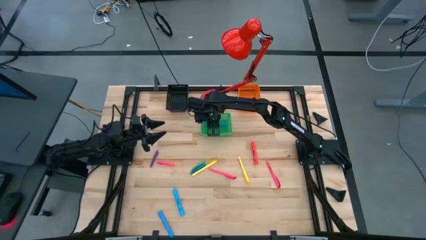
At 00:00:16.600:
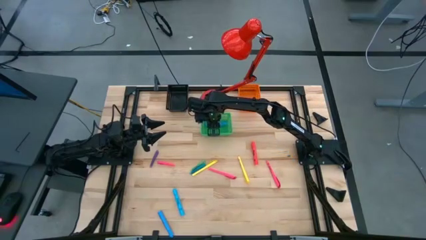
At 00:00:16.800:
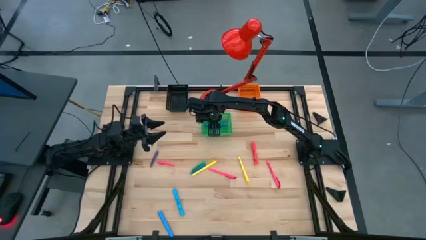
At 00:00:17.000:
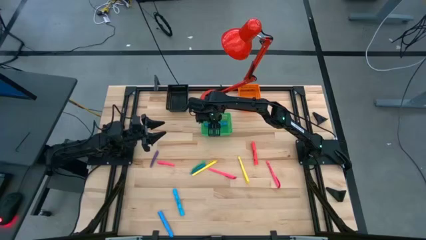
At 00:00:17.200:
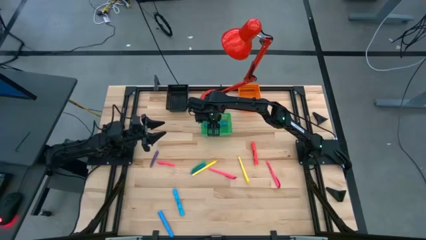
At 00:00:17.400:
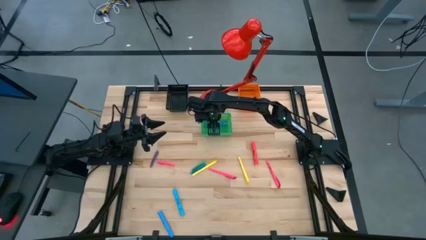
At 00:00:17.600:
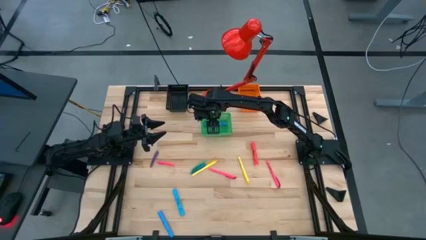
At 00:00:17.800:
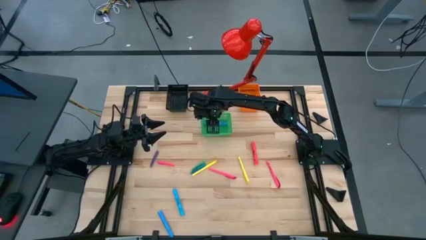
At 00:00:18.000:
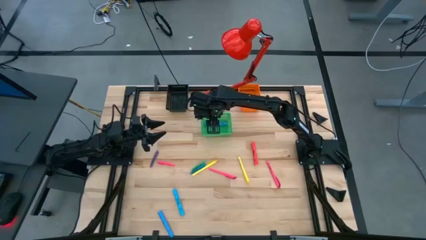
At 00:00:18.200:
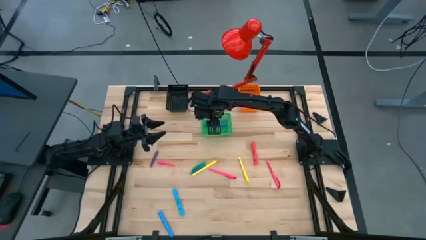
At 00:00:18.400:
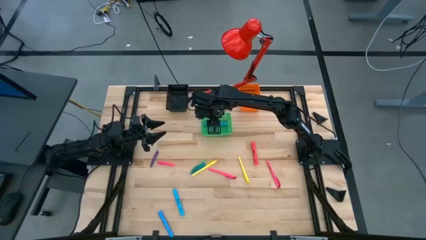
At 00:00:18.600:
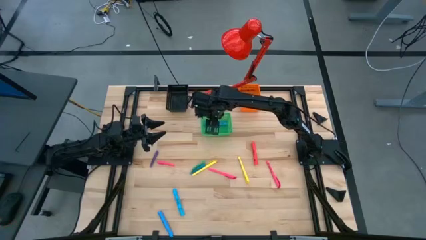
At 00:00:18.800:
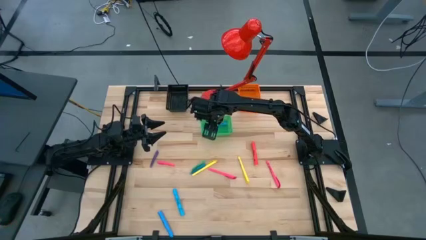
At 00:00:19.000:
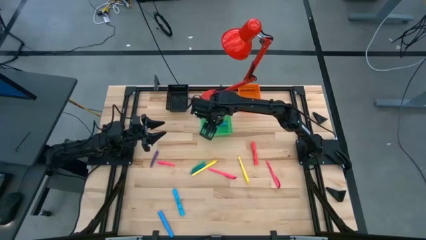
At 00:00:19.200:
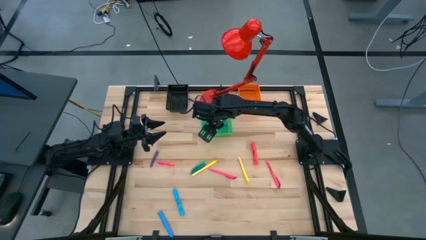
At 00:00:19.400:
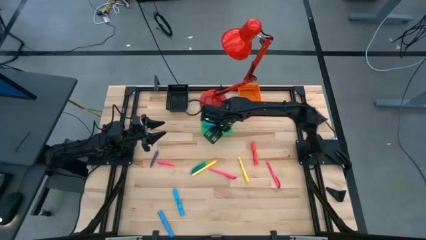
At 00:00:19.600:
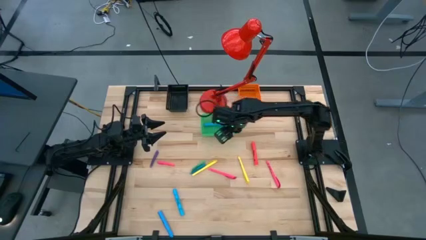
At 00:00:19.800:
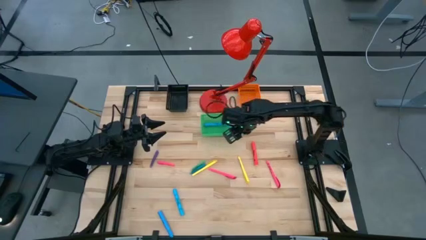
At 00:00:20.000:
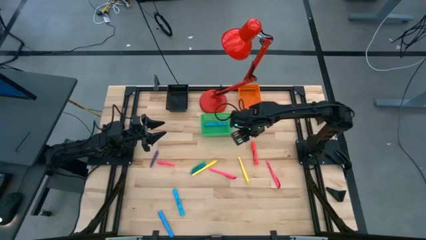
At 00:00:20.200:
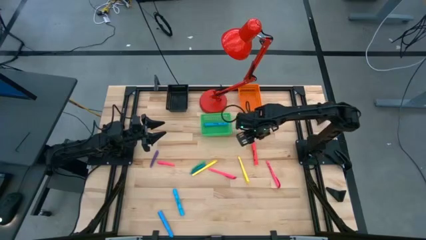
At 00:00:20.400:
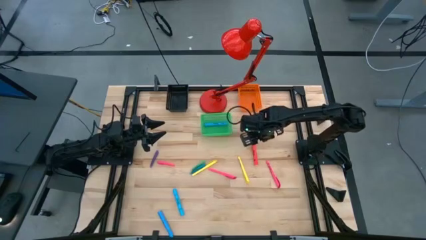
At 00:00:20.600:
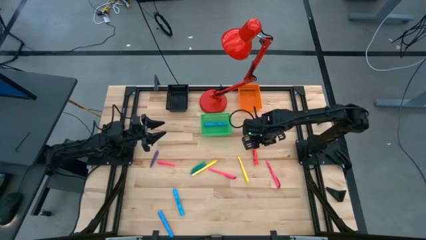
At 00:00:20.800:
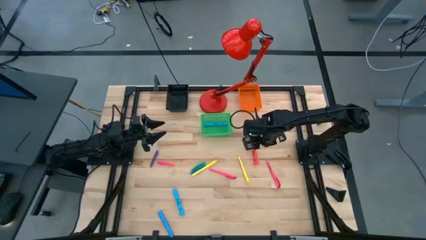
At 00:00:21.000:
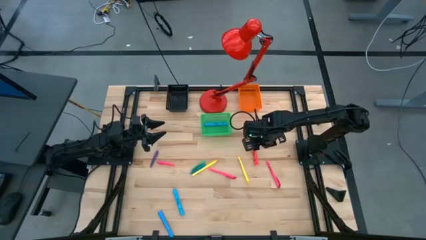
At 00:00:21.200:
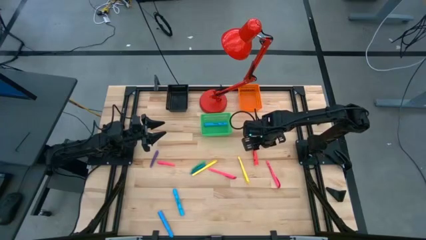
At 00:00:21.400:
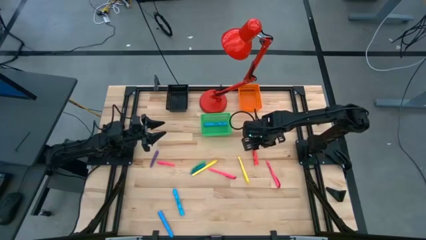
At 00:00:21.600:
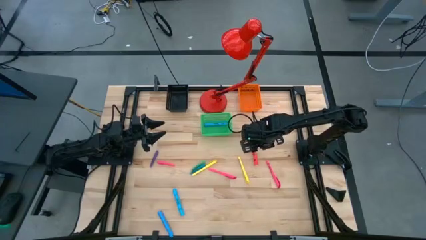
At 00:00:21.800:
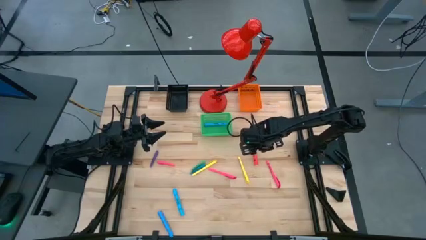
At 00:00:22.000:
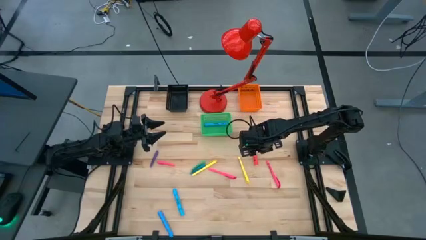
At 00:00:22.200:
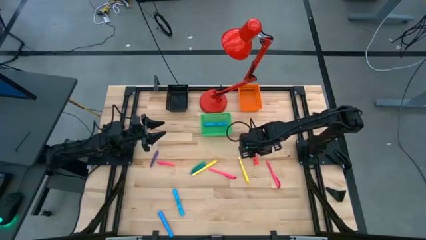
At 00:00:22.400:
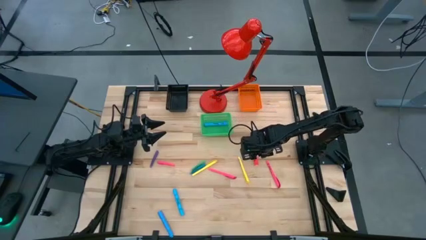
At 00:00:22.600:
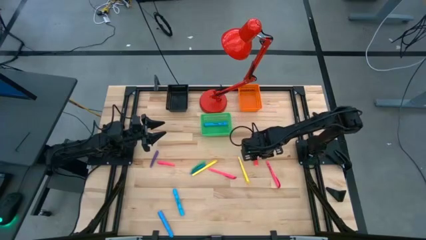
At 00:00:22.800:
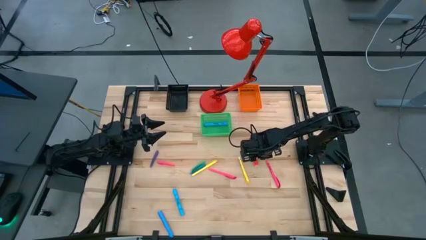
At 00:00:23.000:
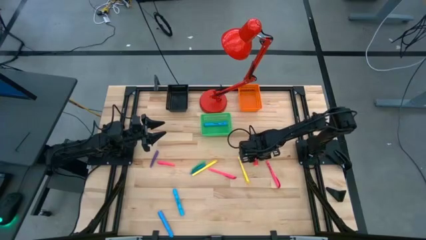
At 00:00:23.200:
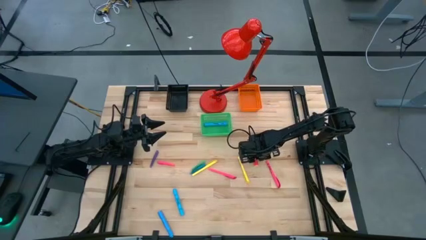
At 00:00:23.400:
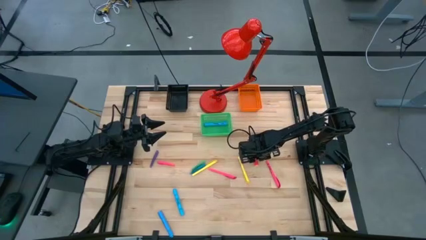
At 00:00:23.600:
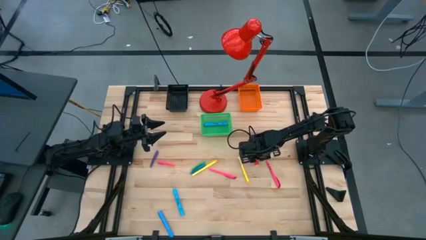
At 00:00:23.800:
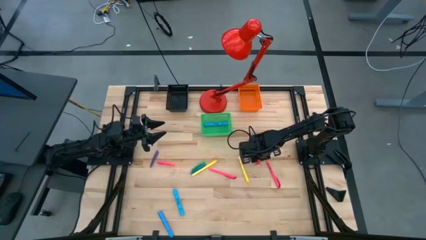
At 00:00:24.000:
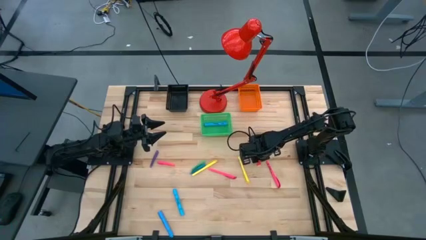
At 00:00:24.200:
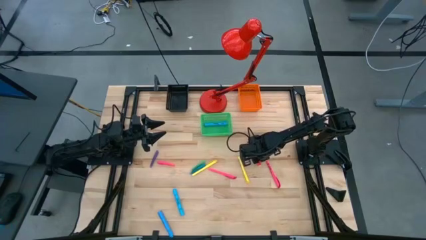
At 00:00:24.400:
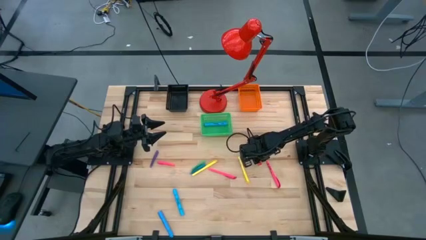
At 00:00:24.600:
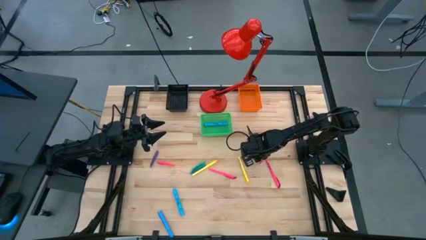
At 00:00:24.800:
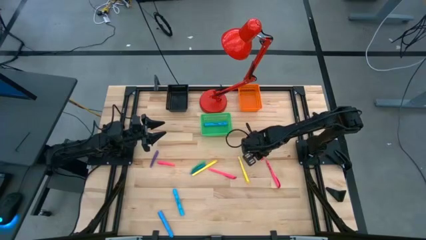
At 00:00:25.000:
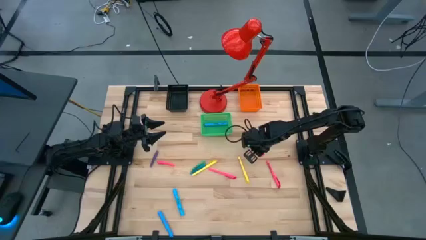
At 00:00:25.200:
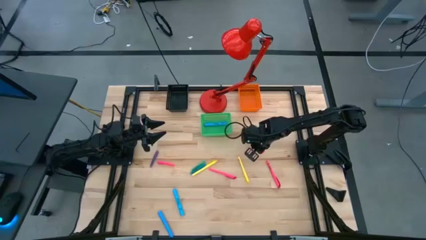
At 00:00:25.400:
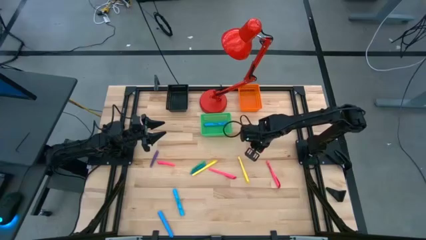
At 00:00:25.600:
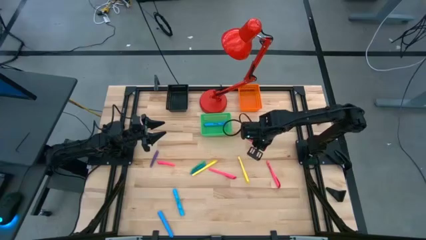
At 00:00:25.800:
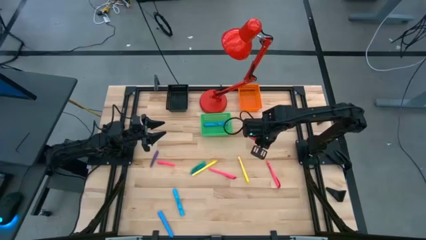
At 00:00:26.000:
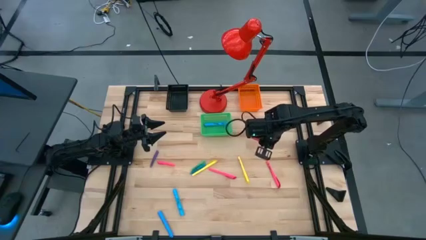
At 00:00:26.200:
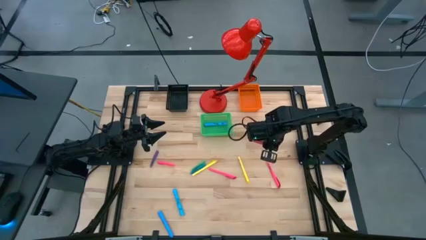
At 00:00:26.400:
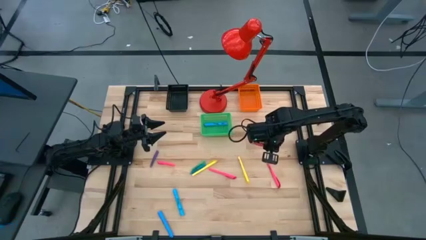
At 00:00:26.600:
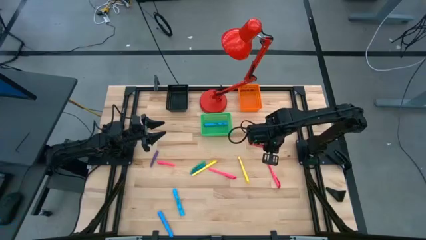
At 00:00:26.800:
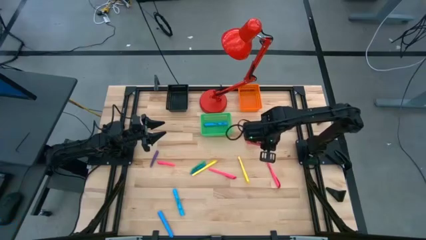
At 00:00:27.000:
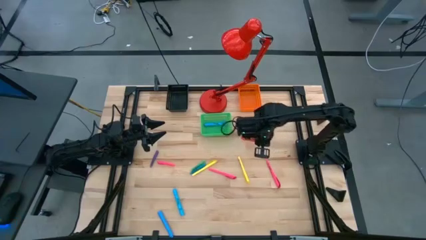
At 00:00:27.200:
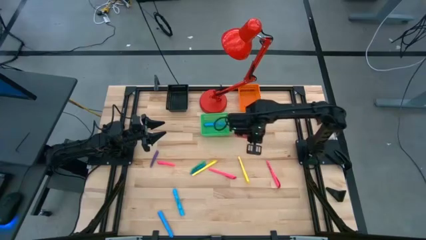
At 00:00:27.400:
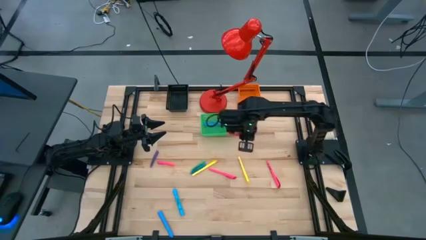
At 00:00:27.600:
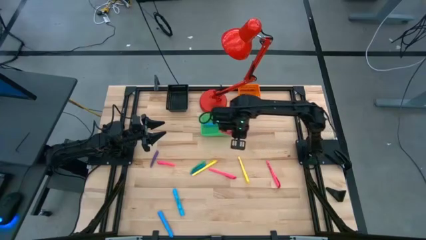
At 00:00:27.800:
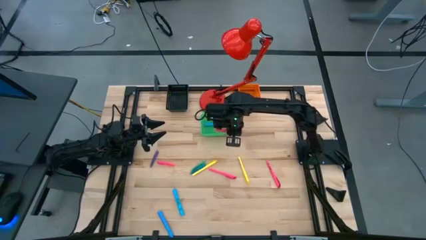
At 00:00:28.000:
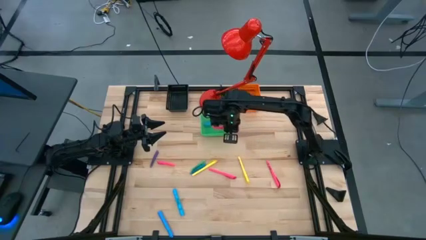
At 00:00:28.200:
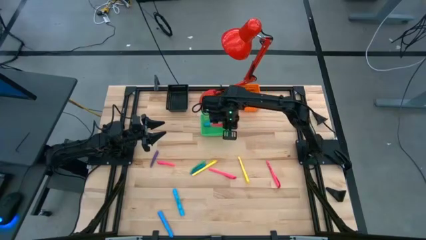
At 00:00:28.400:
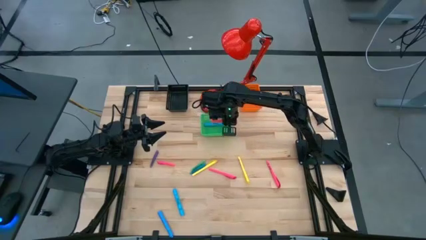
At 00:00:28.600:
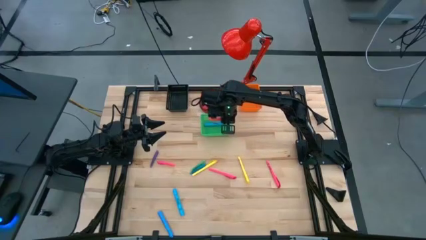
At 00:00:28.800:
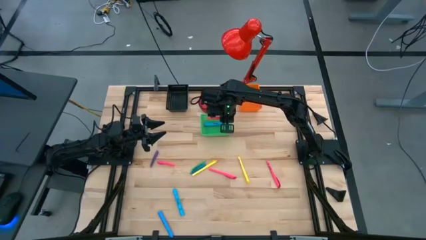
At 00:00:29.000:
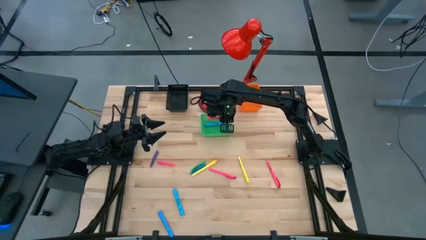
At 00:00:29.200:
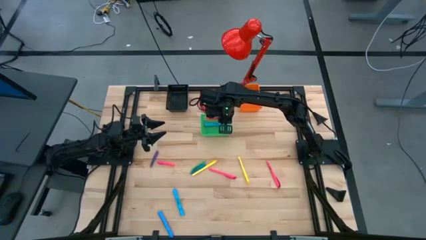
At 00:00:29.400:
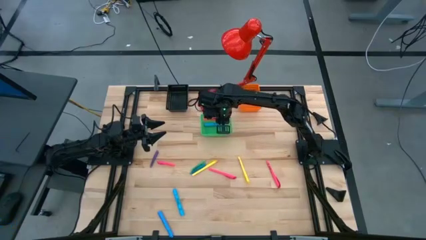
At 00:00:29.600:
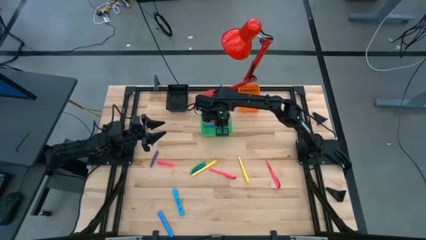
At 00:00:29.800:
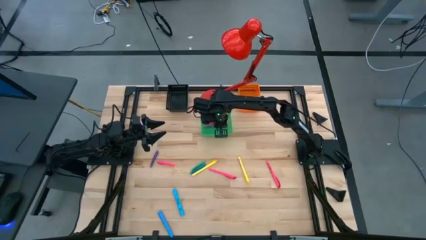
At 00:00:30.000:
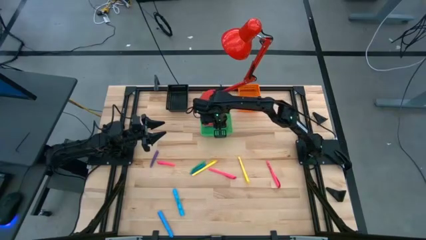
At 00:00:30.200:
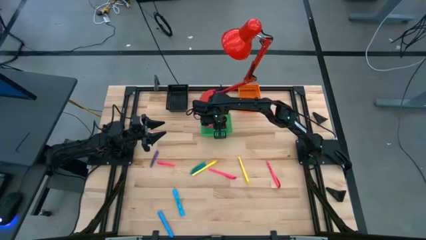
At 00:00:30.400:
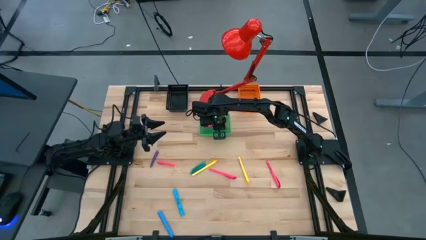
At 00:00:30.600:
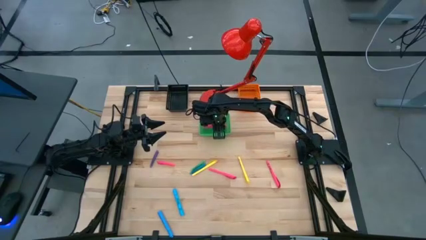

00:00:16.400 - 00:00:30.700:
Task: Pick & Place Markers
Put the big red highlighter into the green basket
